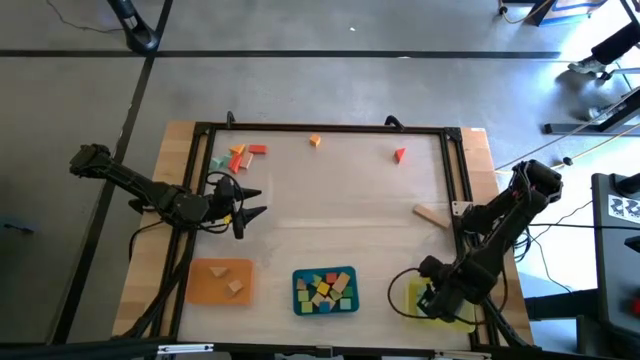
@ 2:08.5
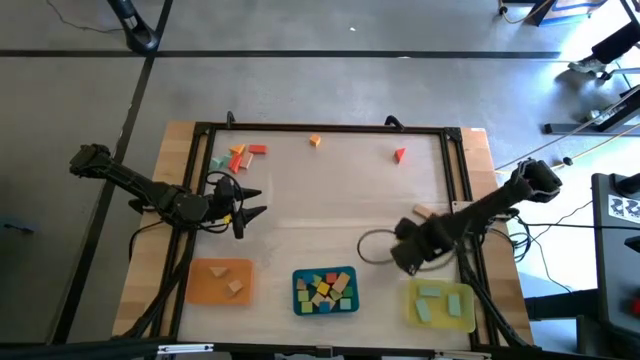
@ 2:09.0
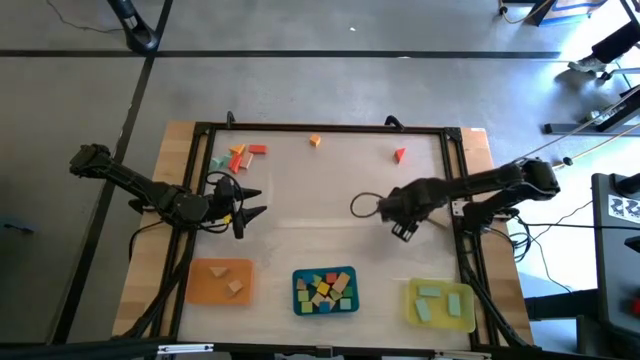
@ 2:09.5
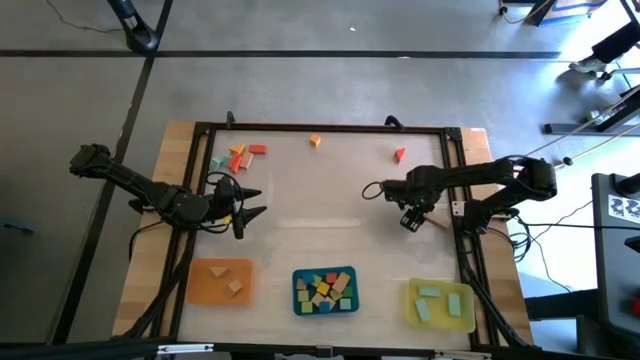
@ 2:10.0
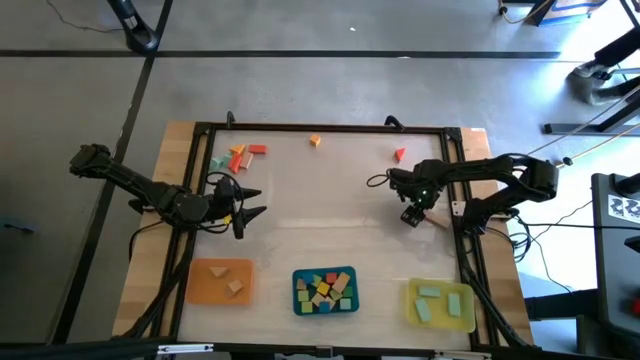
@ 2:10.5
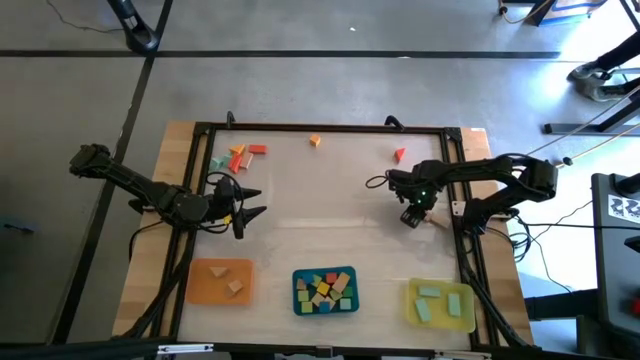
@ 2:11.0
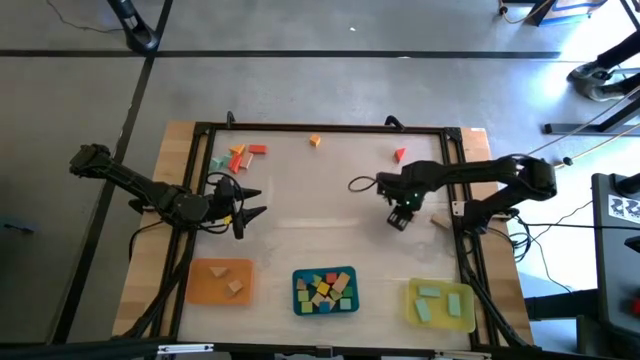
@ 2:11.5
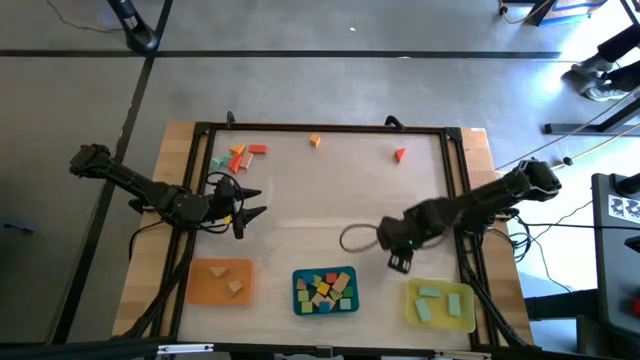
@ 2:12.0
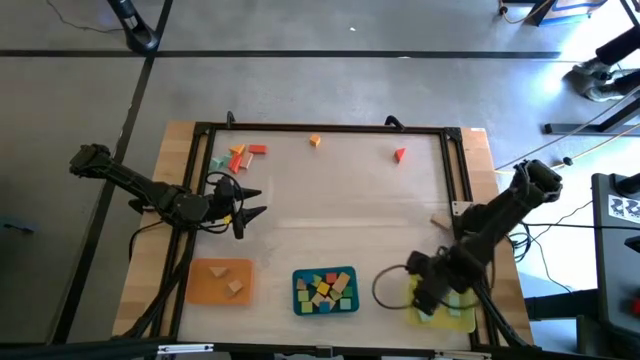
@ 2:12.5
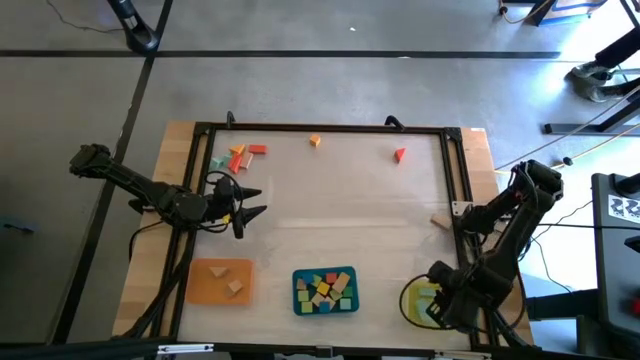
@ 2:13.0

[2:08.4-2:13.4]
Task: Sort blocks by size
Put the brown rectangular block into the yellow bin

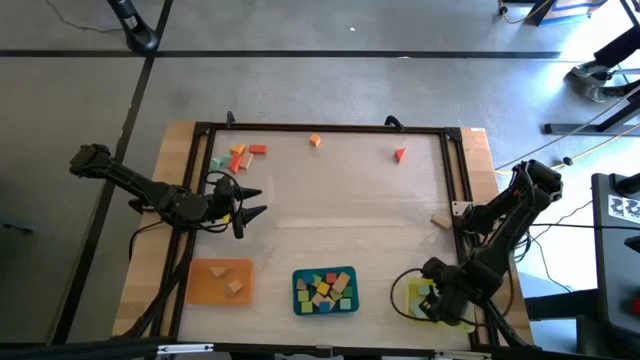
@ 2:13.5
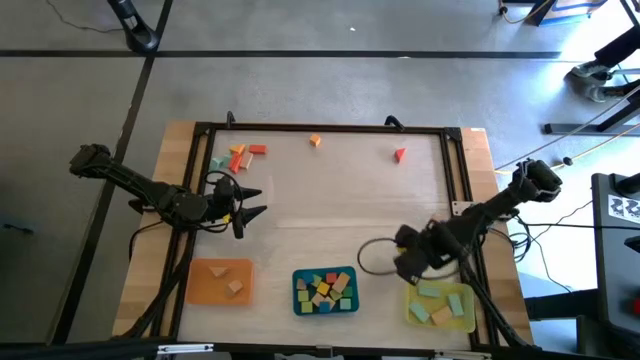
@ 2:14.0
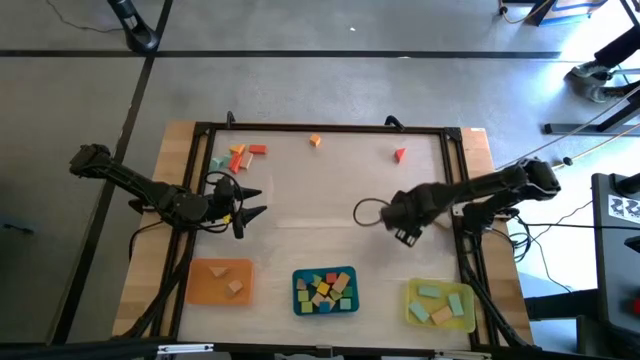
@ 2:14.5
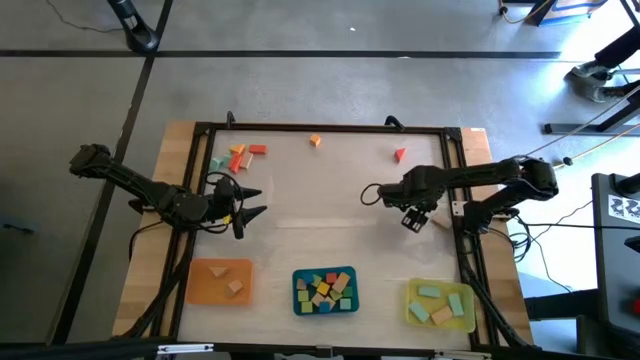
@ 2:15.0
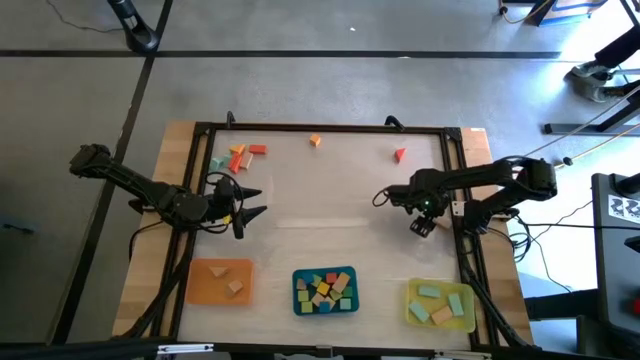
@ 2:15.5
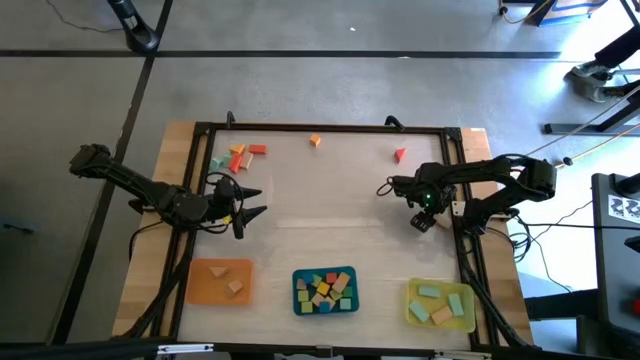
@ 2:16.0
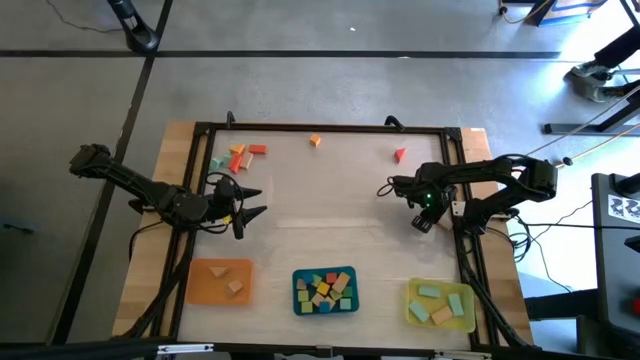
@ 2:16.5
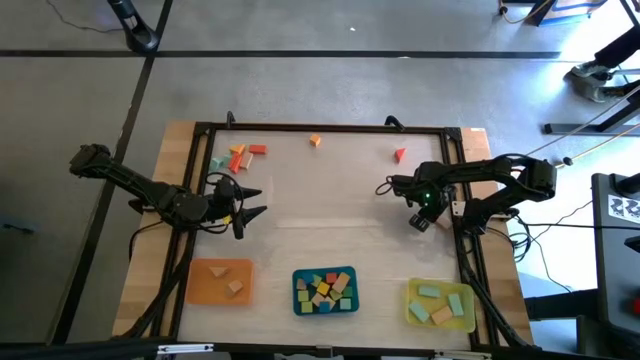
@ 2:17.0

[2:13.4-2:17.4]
Put the brown rectangular block into the yellow bin

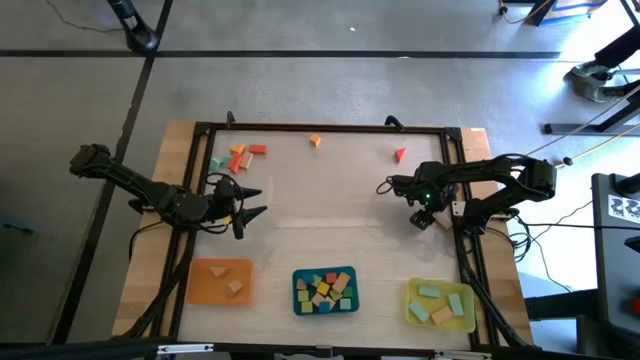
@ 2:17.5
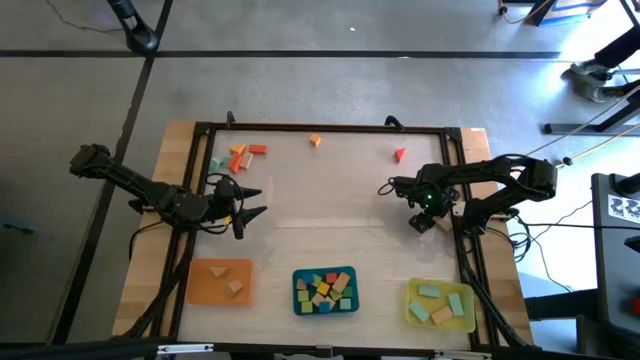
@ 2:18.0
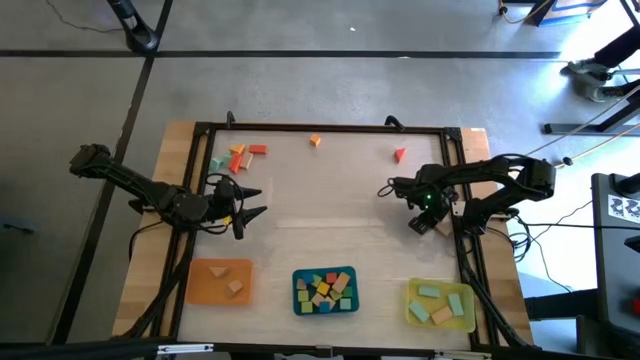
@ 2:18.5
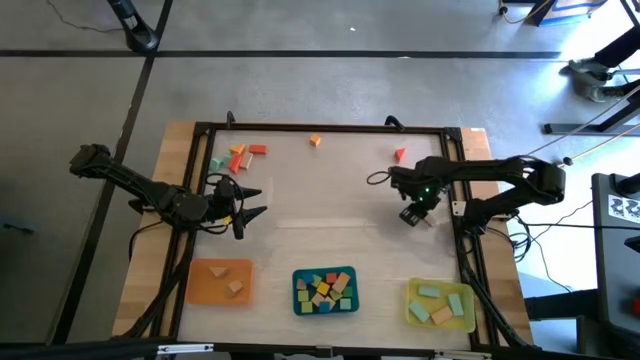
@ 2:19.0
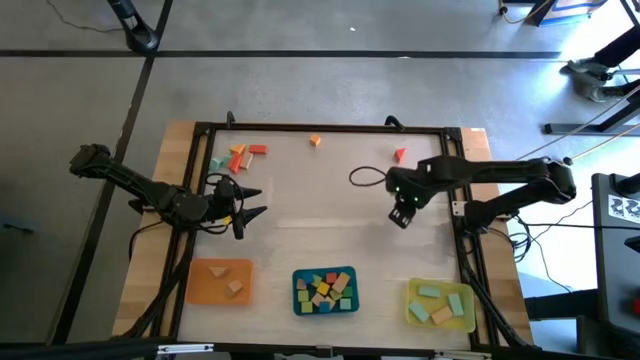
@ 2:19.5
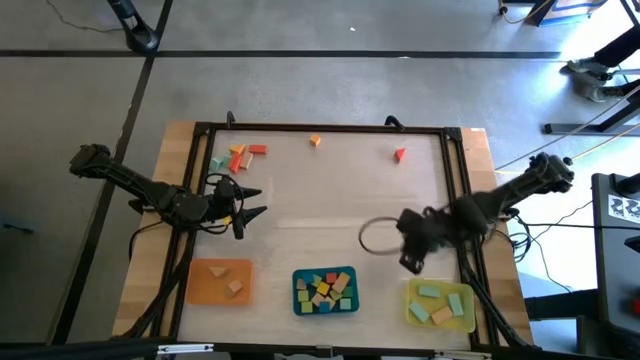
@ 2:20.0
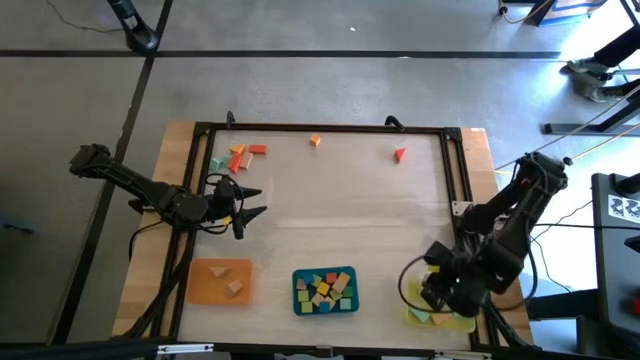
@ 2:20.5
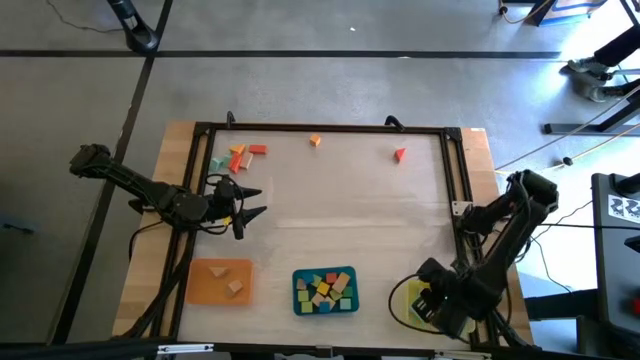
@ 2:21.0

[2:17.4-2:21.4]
Put the brown rectangular block into the yellow bin

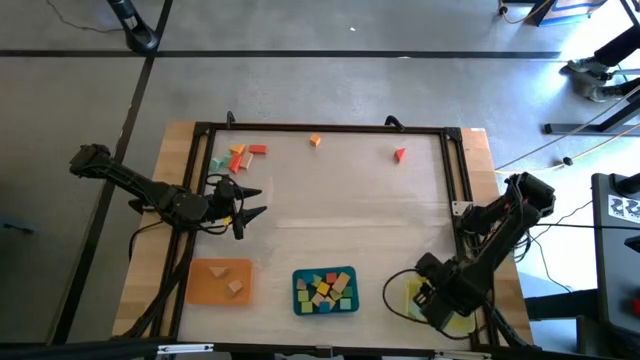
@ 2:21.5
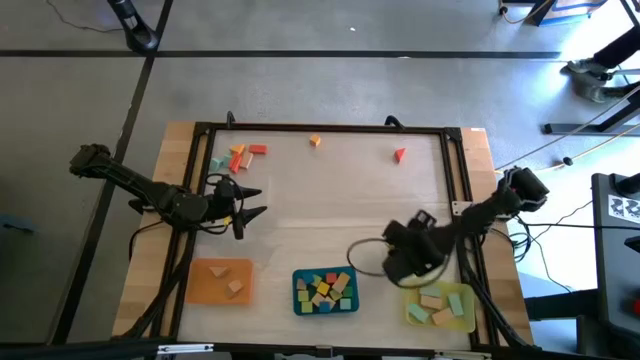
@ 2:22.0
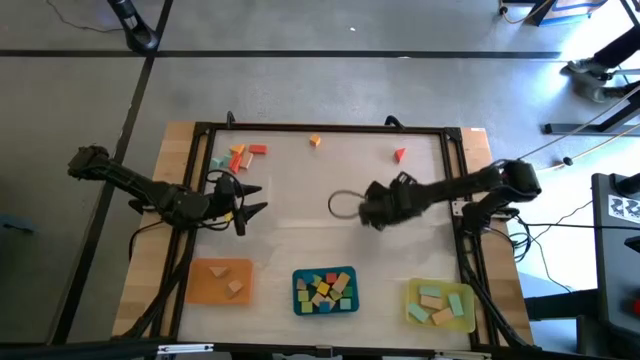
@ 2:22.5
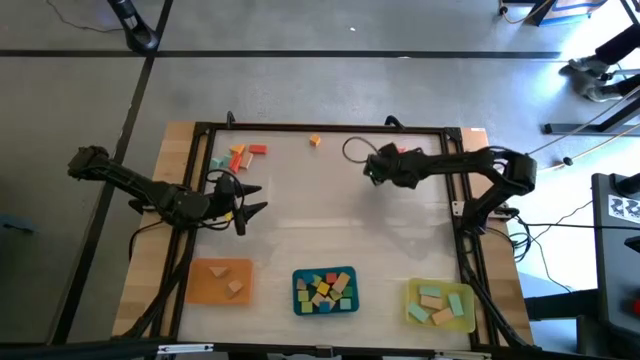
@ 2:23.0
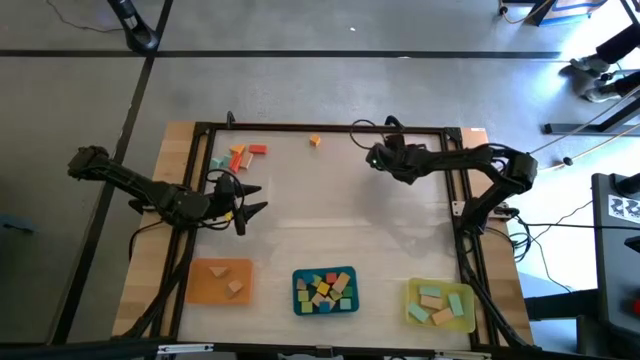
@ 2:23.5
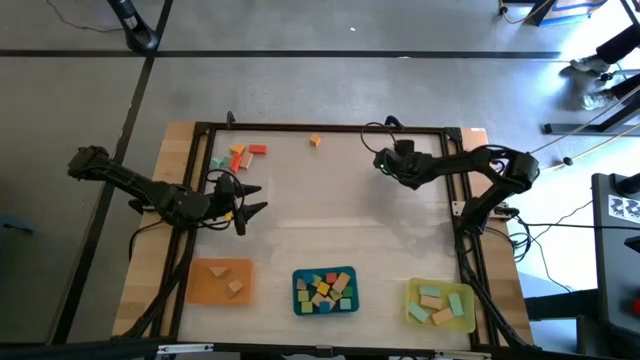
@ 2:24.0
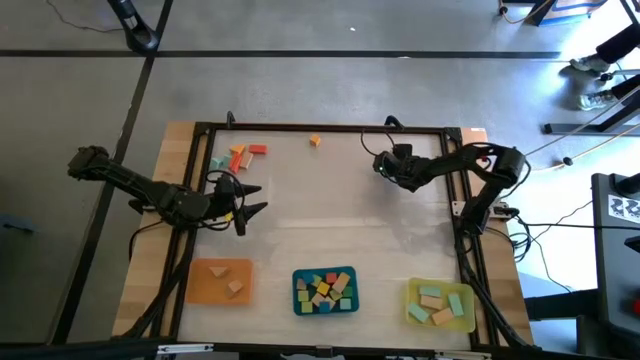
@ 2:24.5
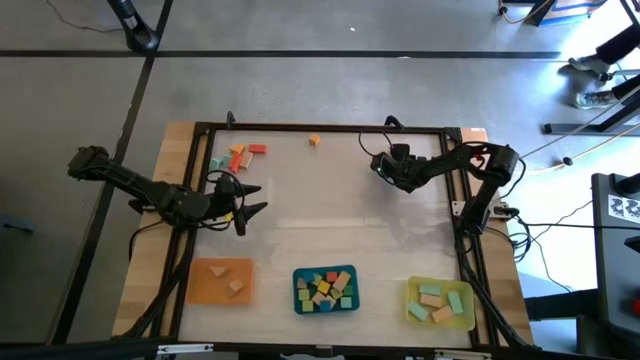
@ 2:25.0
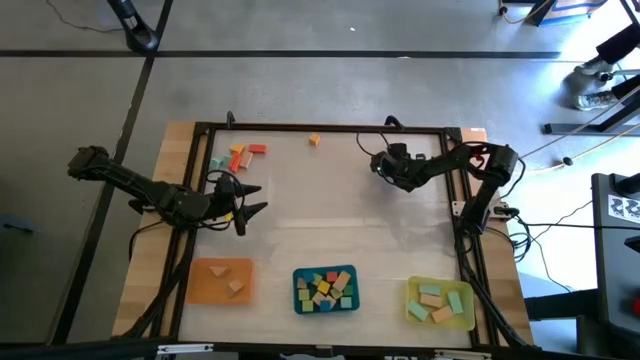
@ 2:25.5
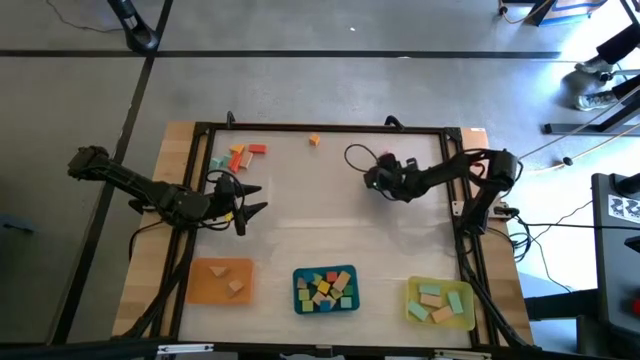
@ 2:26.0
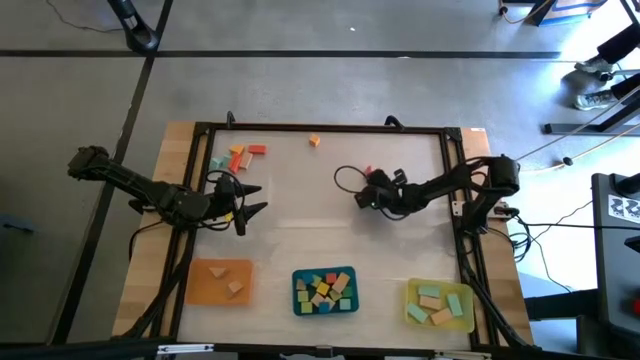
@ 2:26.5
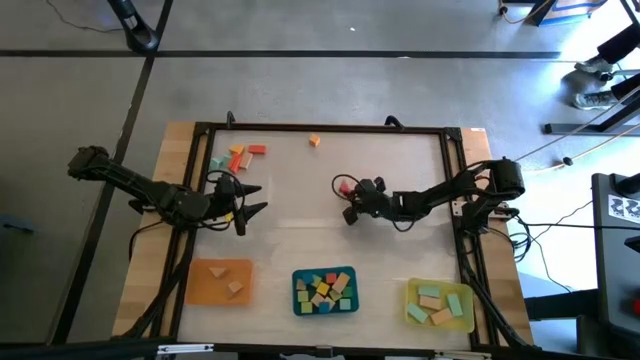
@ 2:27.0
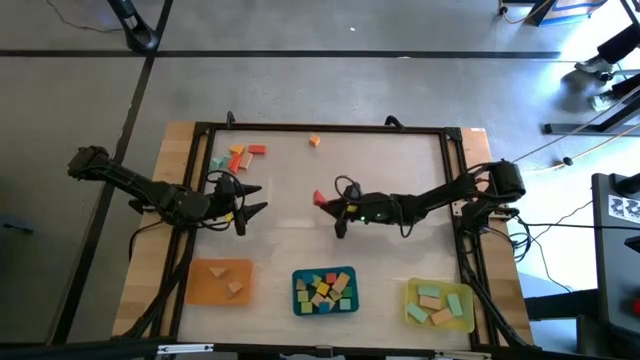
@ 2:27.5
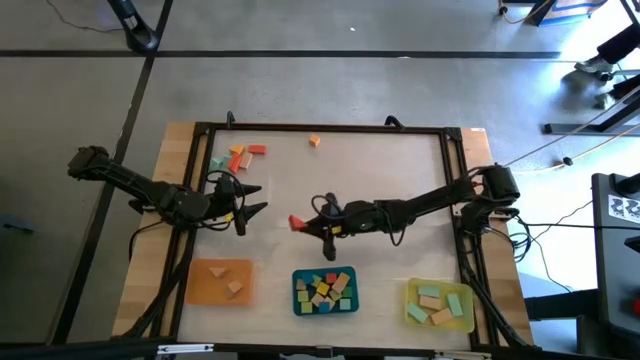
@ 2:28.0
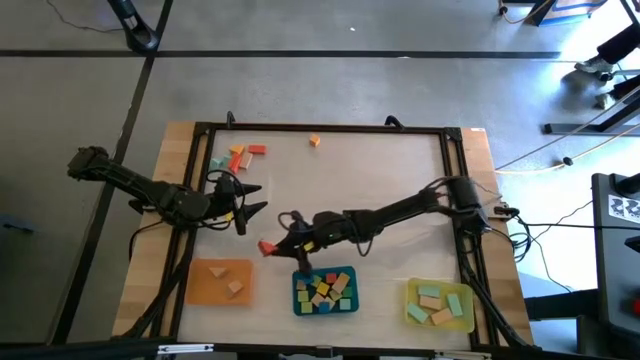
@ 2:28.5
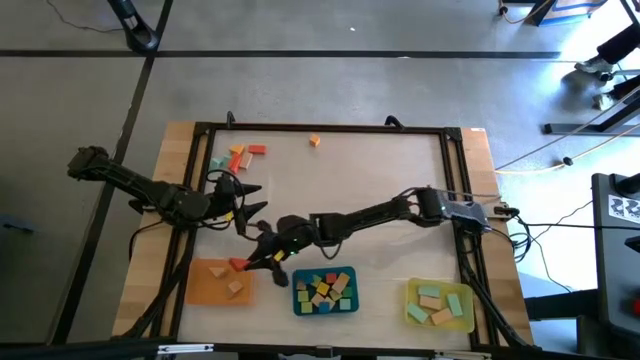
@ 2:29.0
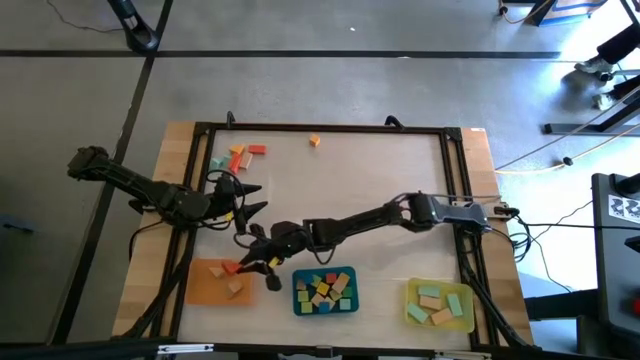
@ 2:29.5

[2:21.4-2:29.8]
Put the orange triangular block into the orange bin
